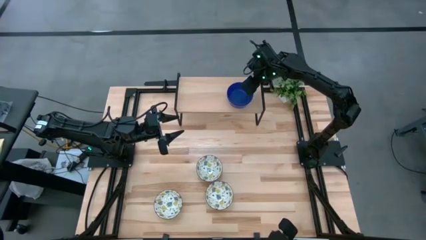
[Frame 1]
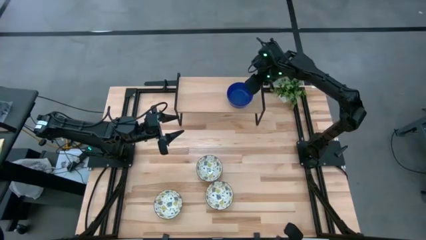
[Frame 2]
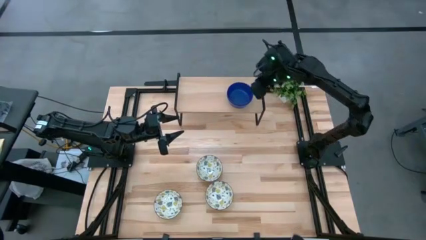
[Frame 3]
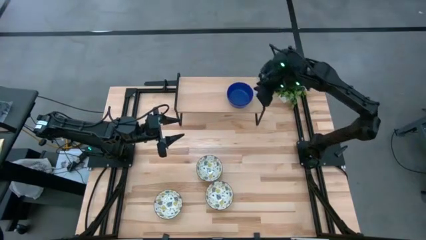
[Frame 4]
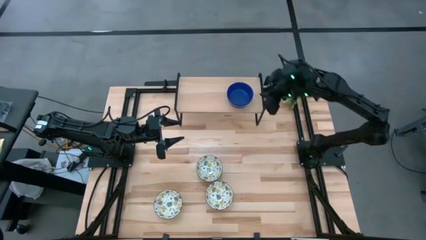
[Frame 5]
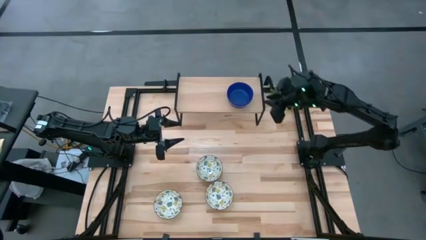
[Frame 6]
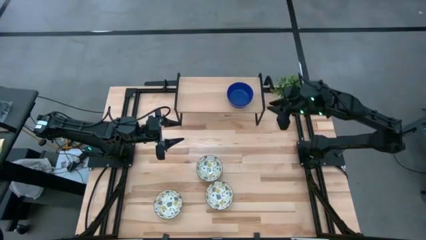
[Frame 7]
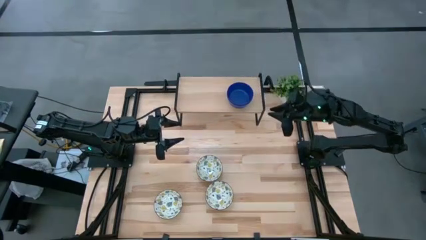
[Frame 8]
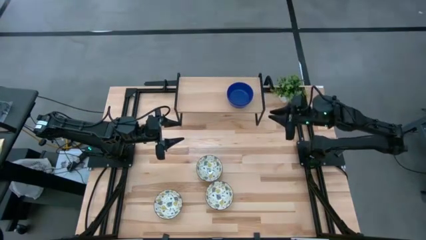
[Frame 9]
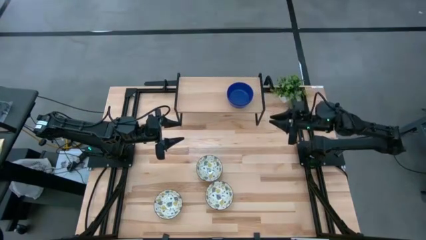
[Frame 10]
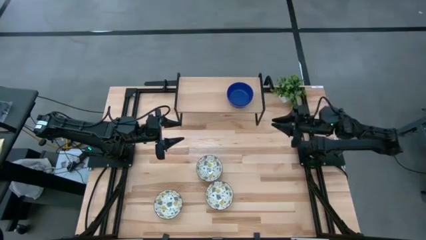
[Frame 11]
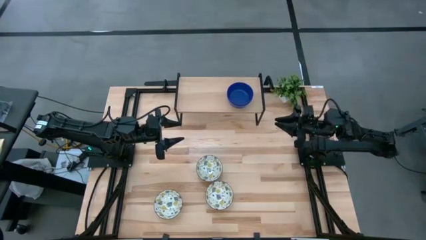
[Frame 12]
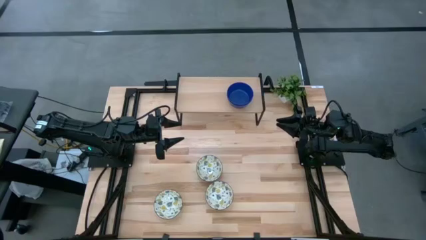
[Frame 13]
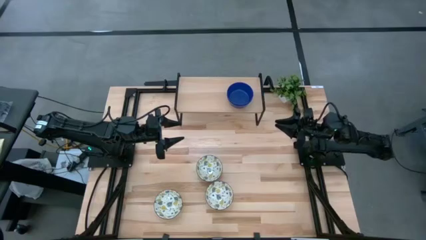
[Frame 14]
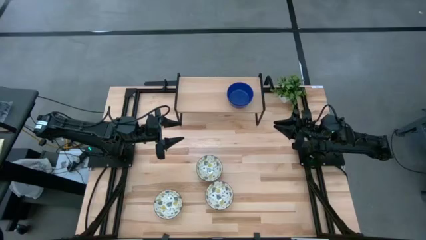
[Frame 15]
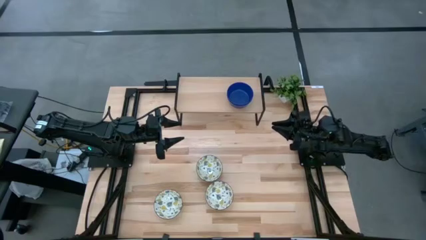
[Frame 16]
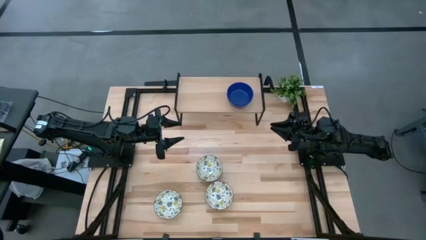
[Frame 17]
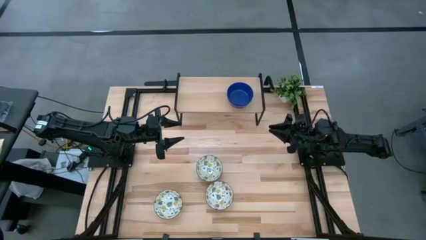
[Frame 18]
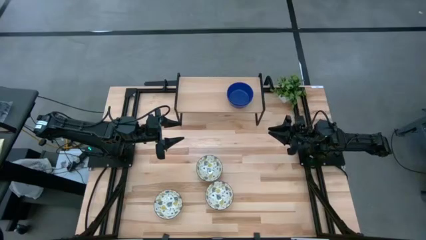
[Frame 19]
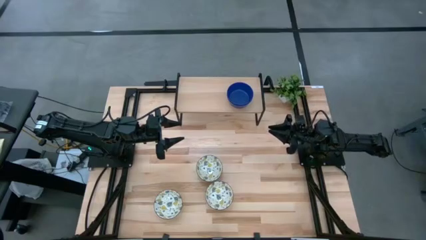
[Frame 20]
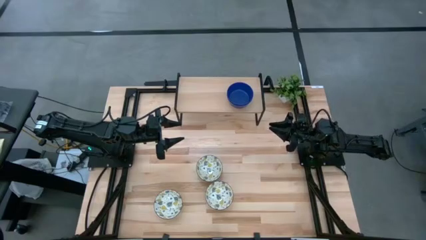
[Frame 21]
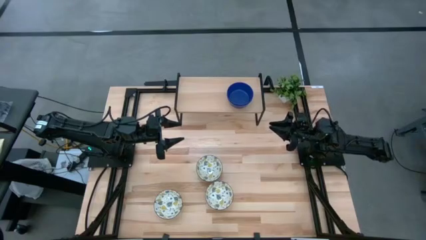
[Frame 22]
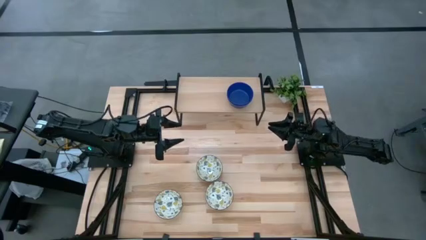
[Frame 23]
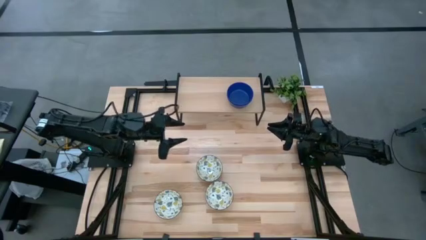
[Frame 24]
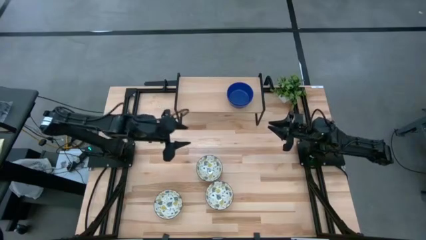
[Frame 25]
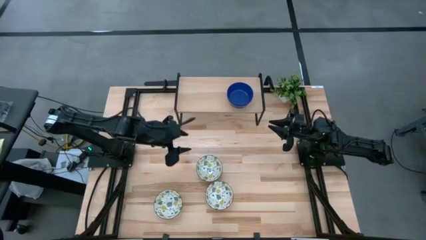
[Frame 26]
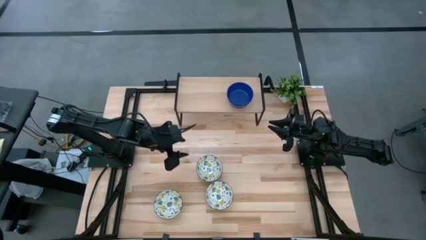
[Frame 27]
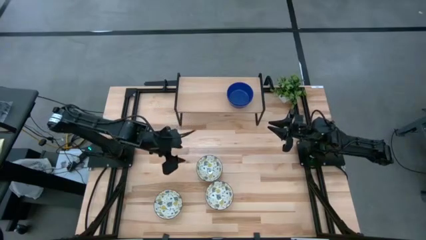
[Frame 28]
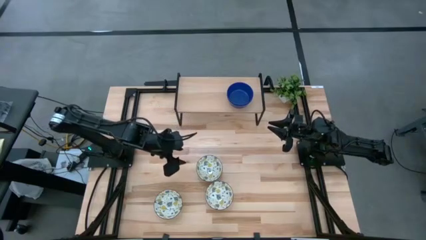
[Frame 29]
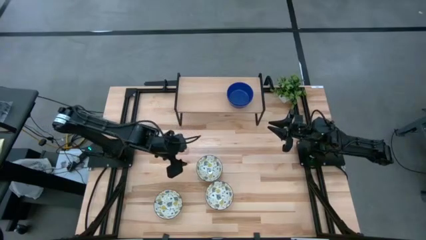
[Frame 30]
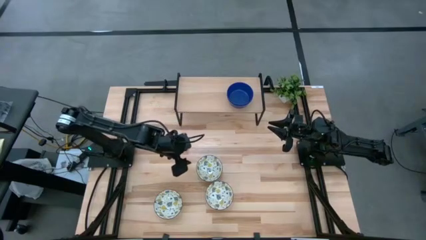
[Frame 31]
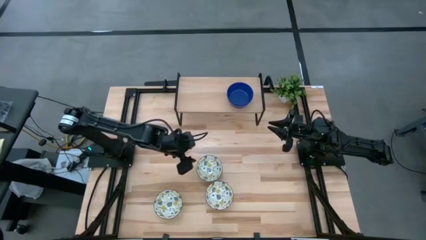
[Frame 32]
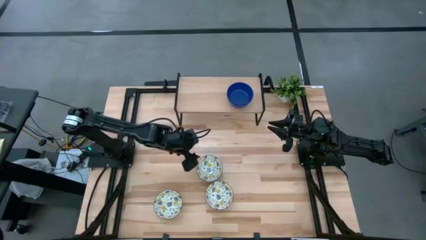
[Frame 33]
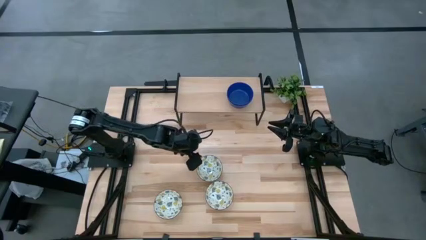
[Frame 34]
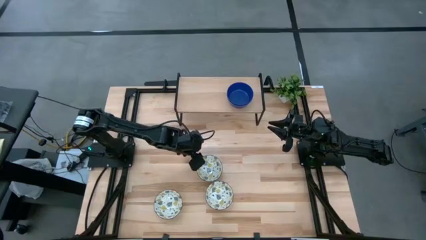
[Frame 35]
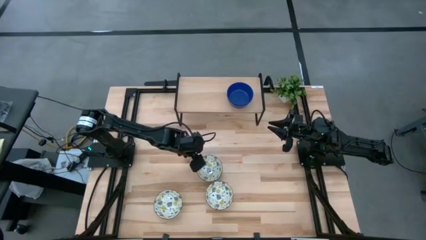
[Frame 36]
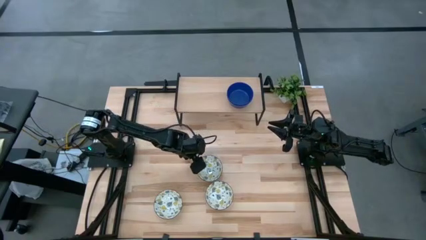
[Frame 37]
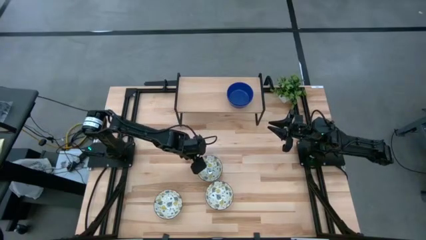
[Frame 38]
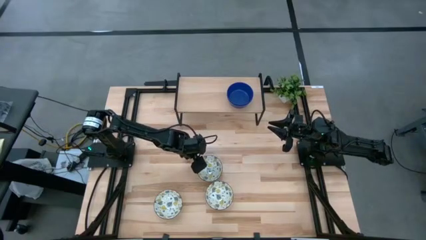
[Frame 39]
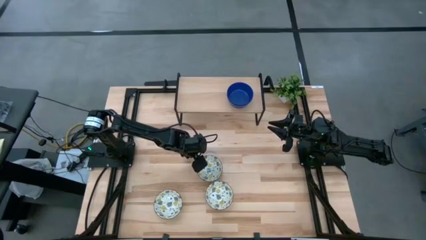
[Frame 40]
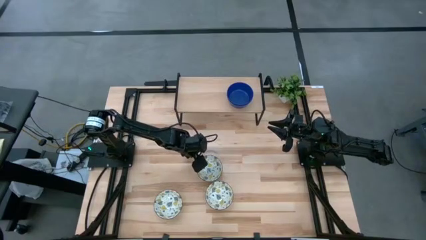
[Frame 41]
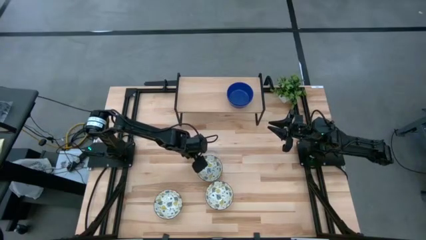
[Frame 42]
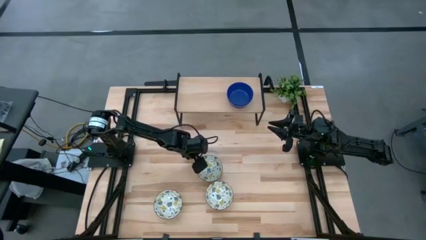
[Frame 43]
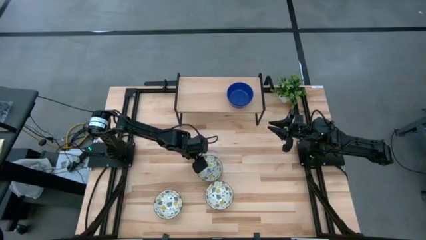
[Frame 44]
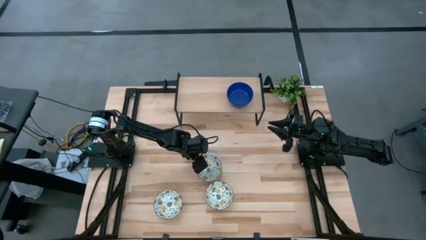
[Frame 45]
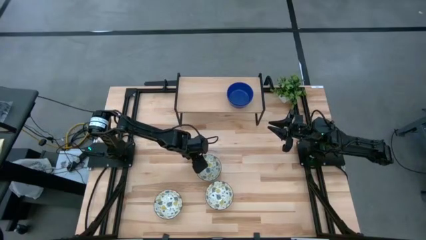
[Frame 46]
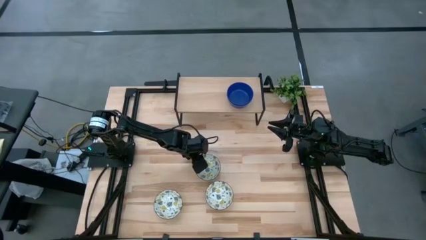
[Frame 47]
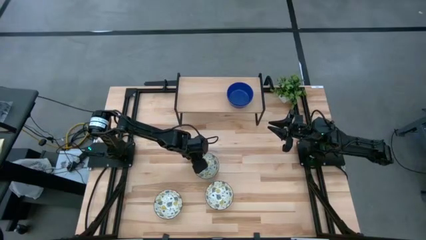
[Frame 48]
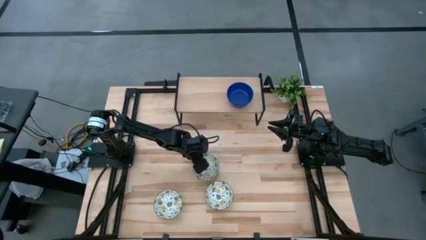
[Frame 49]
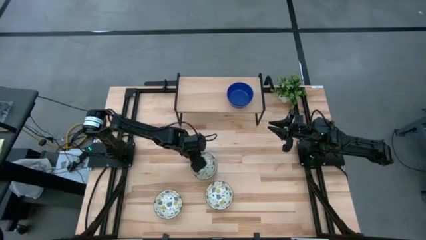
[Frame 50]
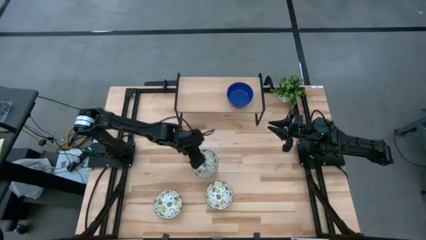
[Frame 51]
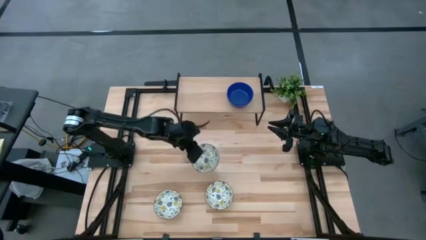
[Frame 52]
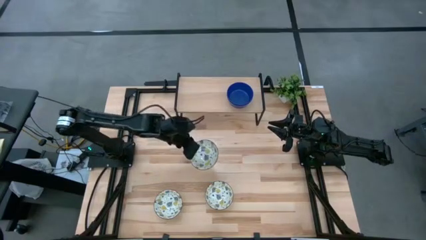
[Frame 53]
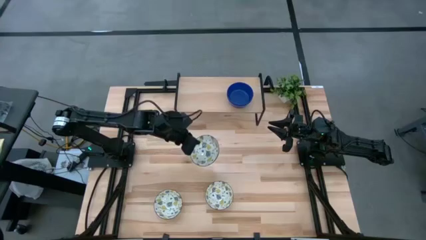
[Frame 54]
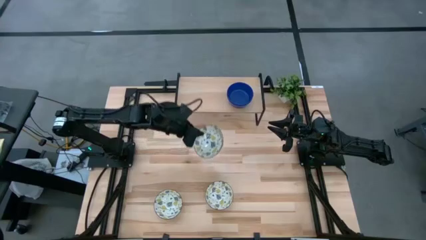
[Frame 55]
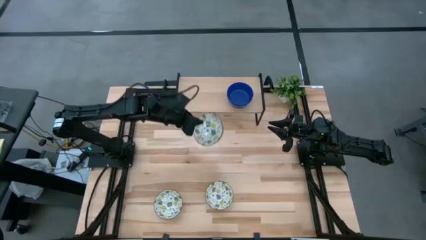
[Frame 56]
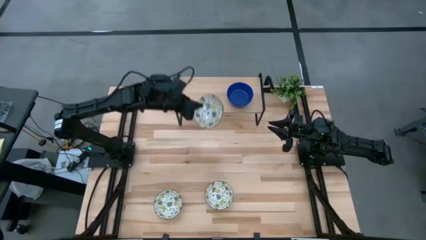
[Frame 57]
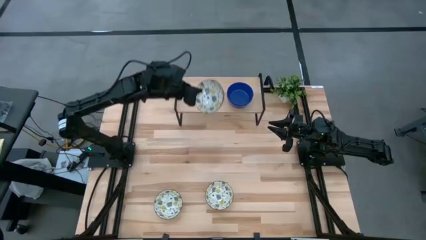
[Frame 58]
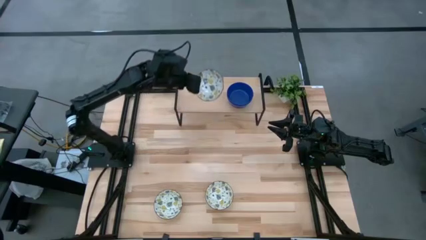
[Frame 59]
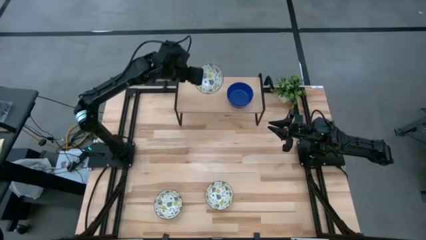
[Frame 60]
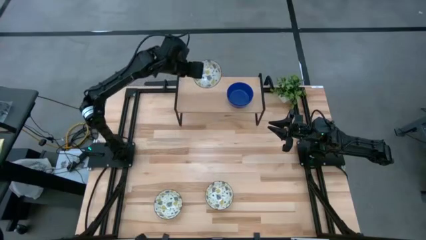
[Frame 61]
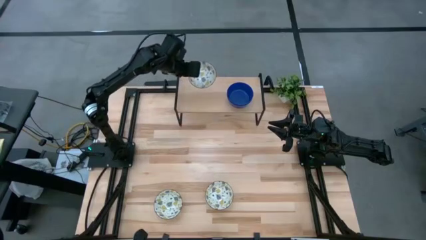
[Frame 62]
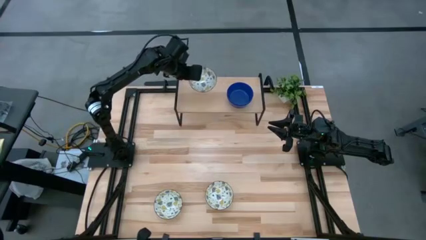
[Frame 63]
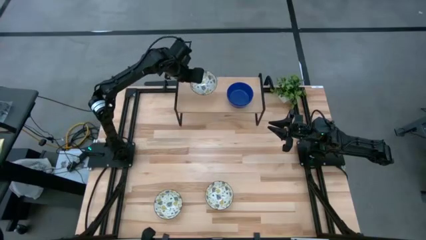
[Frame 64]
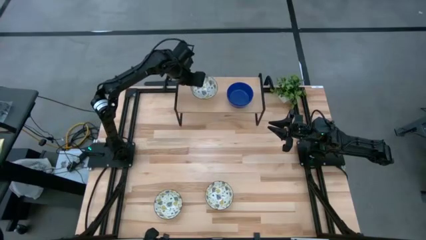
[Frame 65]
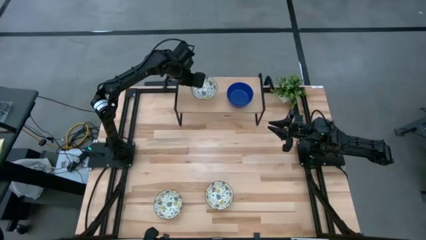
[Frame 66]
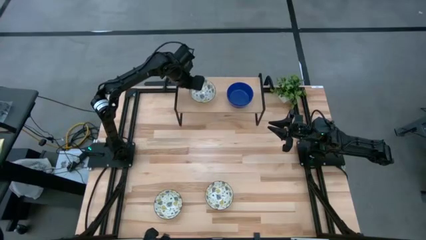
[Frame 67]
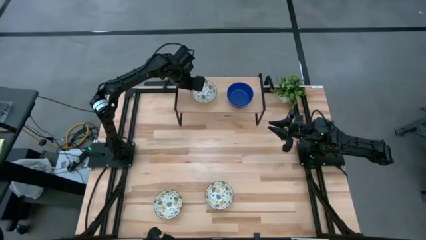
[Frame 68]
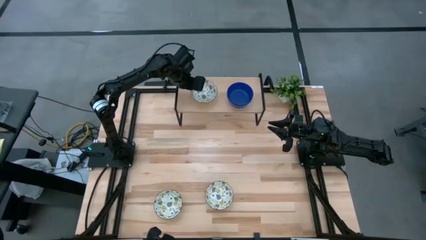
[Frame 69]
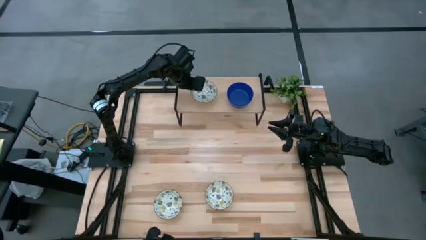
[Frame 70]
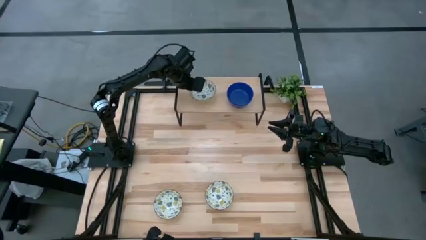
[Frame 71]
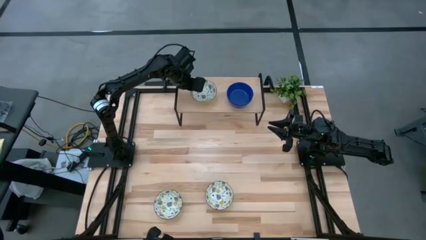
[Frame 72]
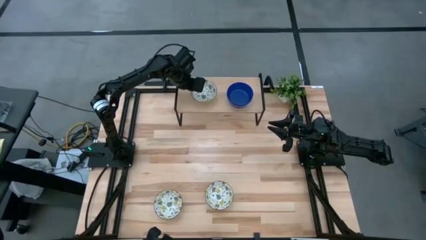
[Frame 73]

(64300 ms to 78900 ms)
Task: Pick & Place Mini bowls
Put the top right white patterned bowl on the shelf
